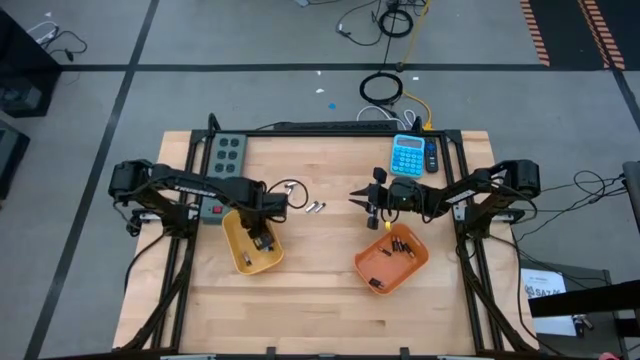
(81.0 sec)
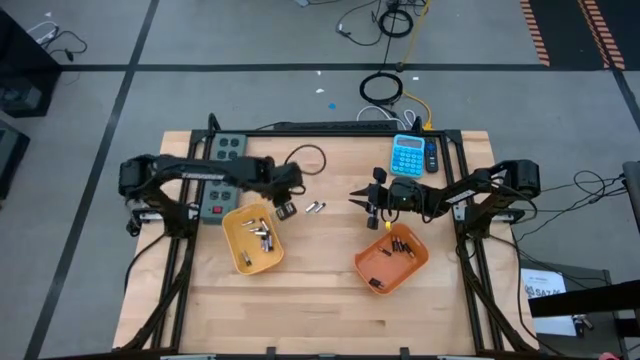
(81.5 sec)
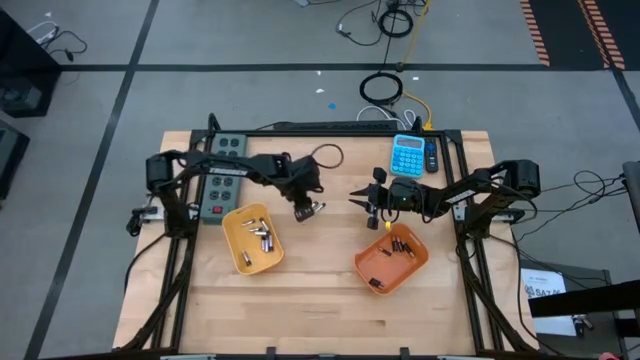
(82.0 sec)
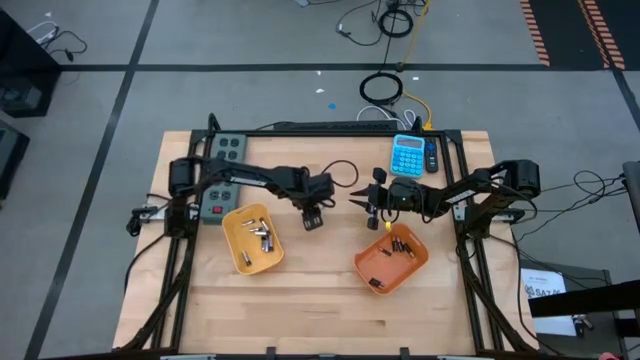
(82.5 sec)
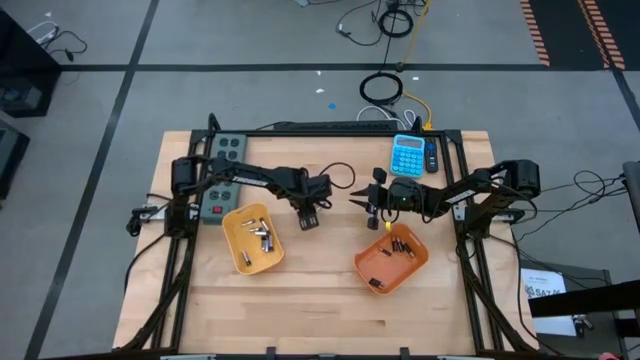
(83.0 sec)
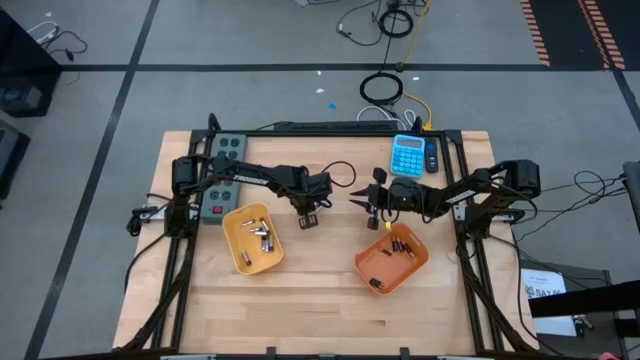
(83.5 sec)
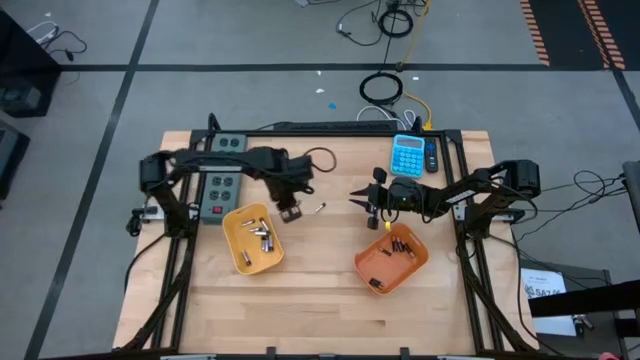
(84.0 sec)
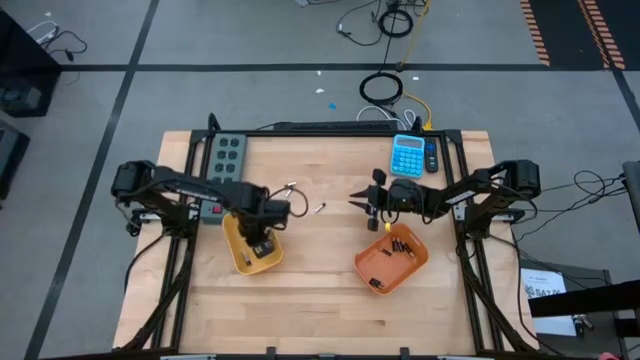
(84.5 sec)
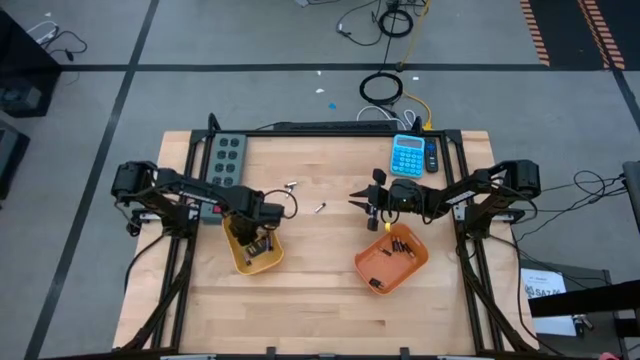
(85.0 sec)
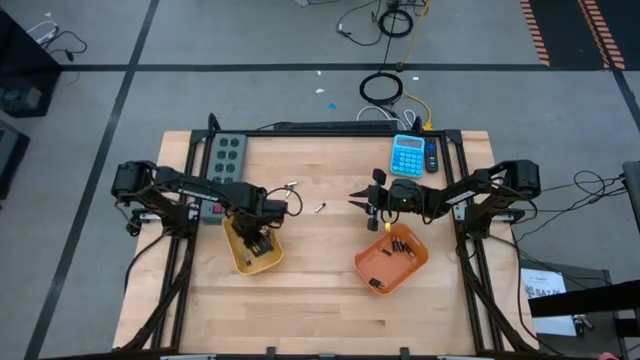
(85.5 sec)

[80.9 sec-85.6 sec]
Task: Sort batteries
Put the silver battery into the yellow bin

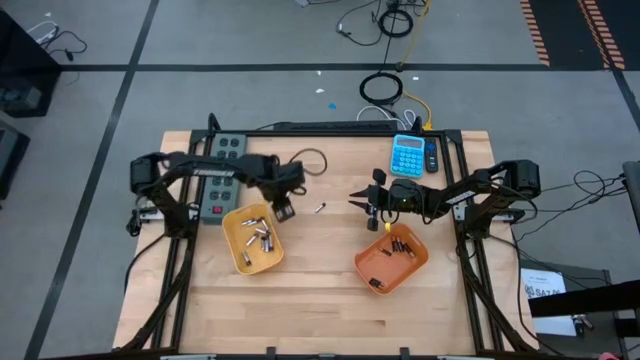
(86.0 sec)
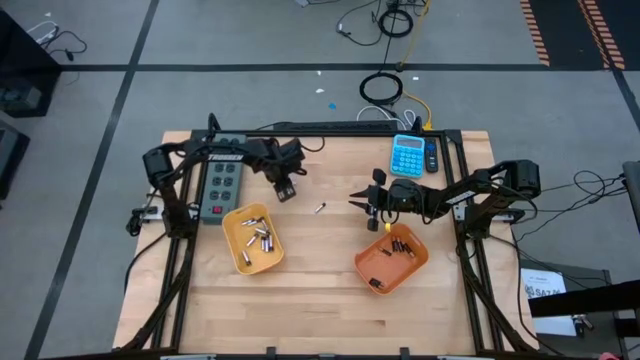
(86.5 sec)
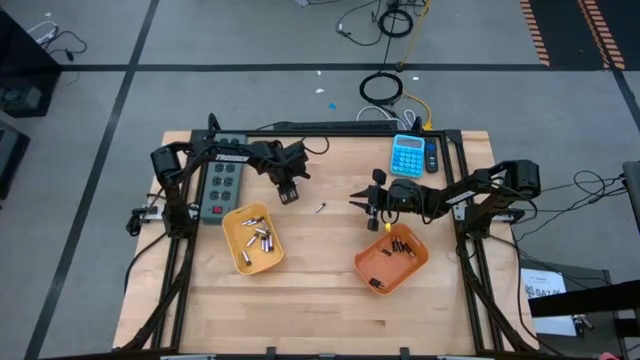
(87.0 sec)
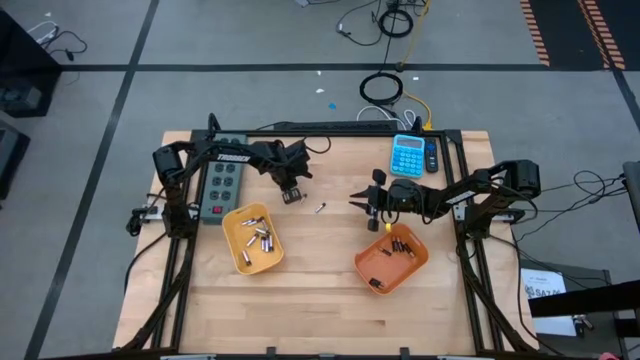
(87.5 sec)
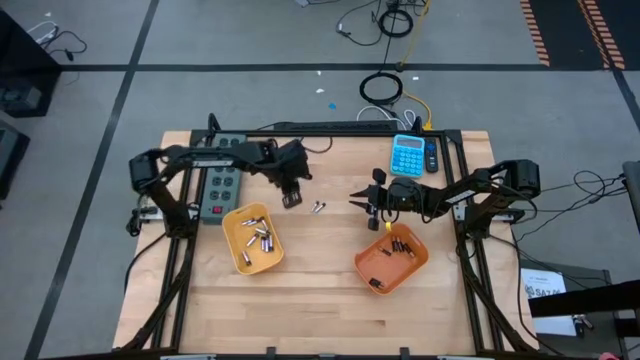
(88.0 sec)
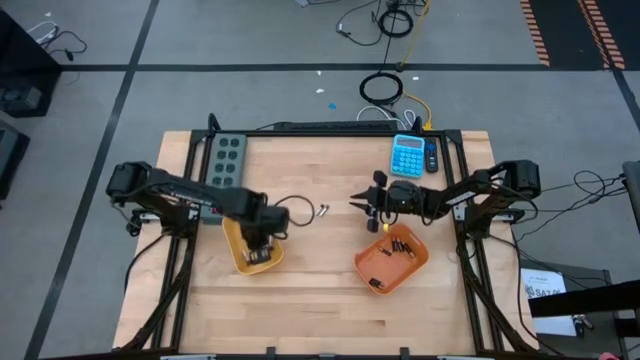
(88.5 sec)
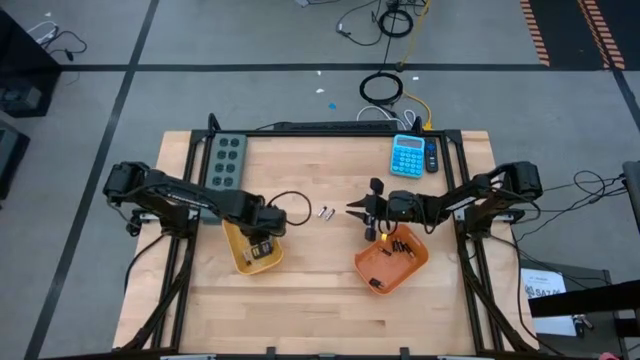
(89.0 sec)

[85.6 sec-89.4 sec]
Put the silver battery into the yellow bin

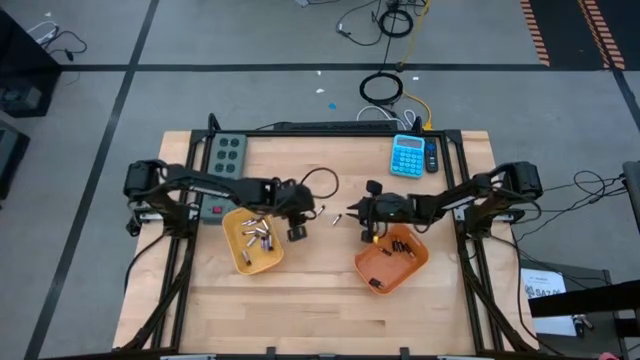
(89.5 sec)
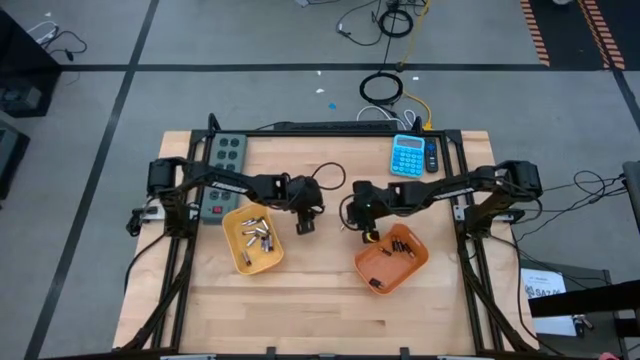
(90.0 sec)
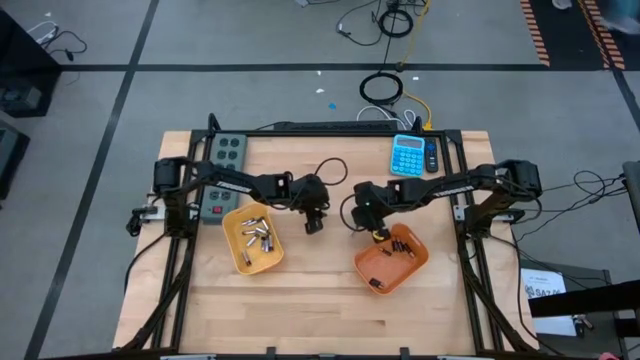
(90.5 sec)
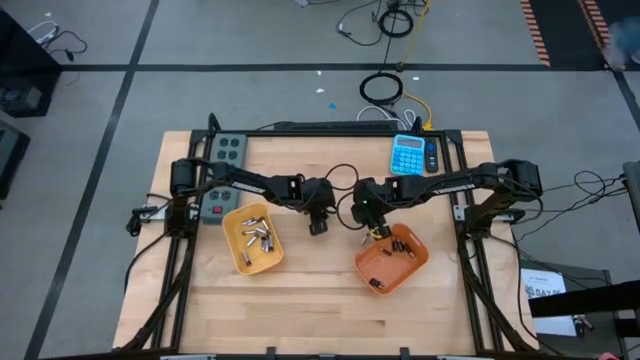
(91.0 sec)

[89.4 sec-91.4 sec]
Put the silver battery into the yellow bin

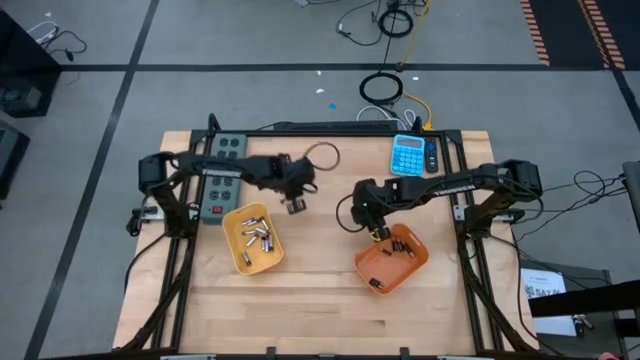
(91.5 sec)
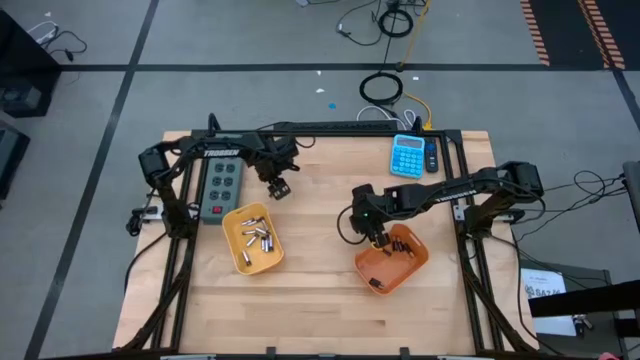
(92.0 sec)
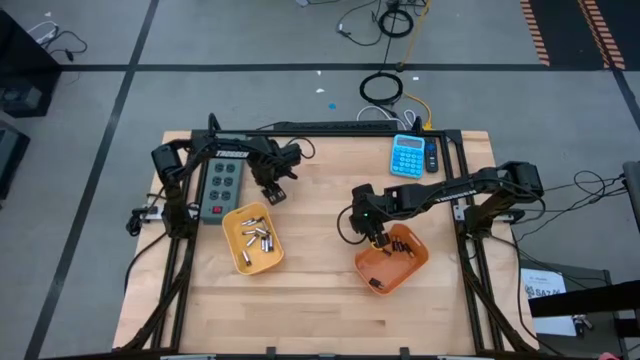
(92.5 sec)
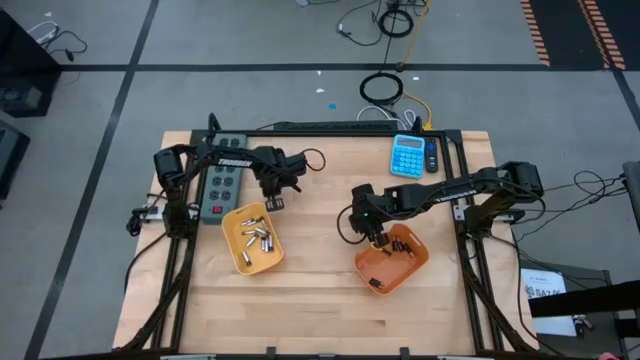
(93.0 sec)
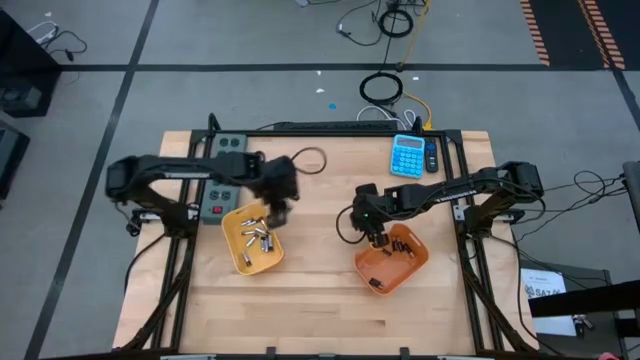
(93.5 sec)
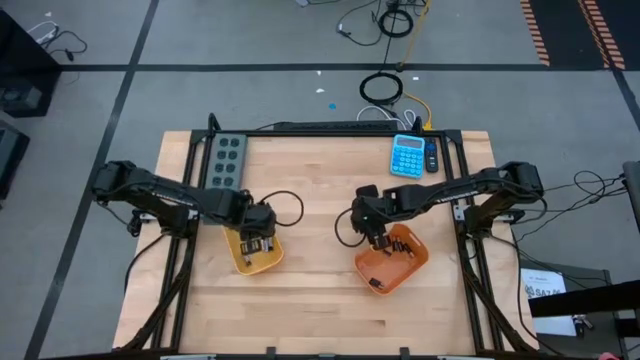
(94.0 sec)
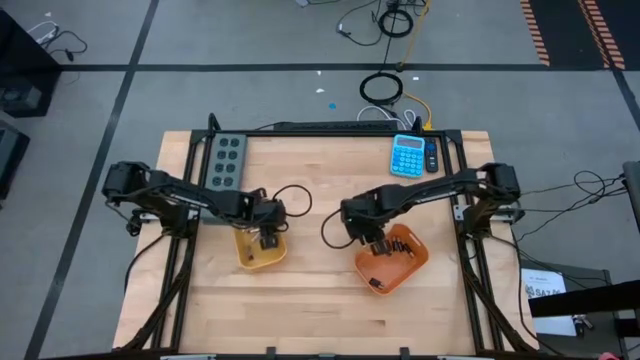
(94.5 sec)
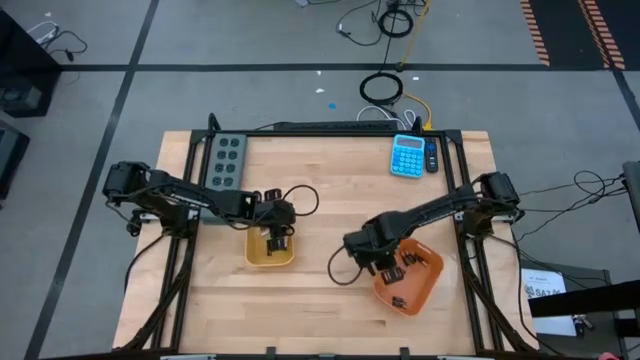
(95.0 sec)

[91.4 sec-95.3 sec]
Put the silver battery into the yellow bin

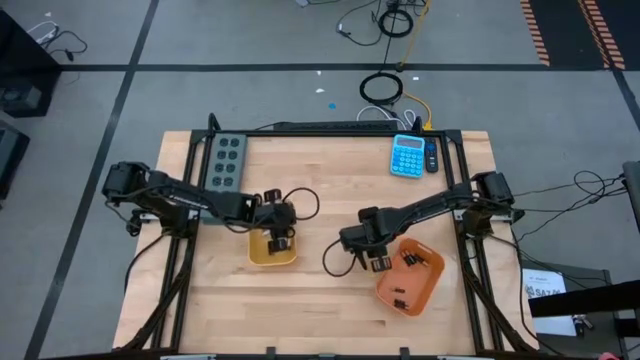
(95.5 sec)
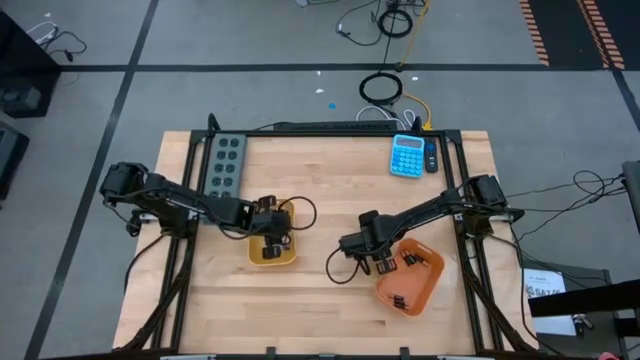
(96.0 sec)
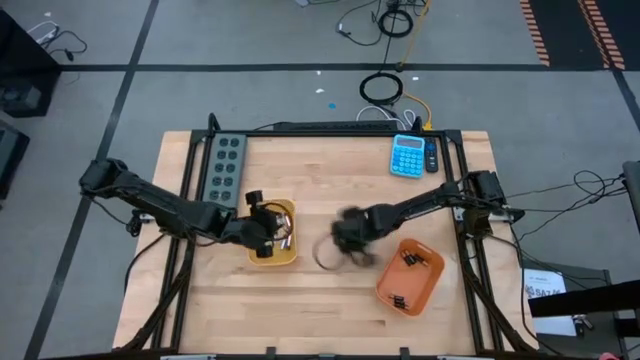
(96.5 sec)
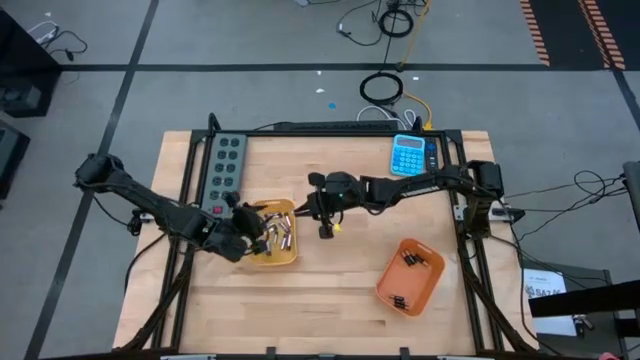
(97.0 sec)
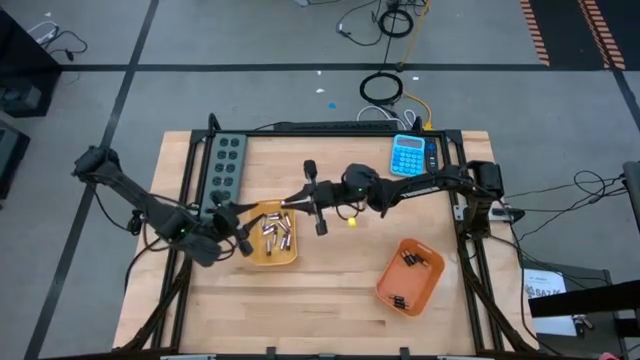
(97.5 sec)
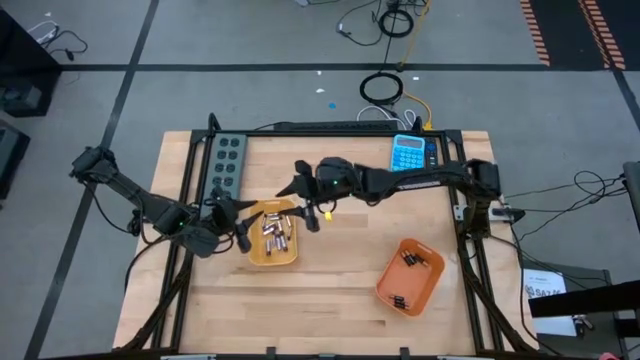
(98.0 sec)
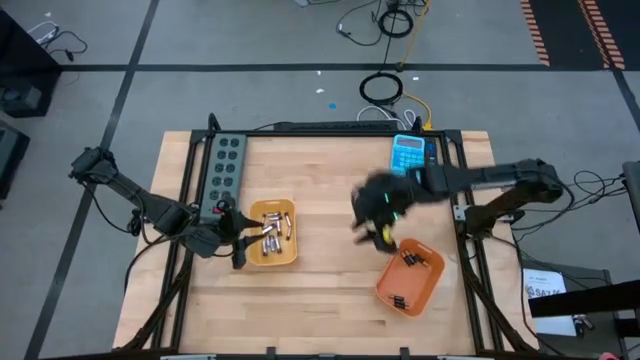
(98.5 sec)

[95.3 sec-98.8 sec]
Put the silver battery into the yellow bin

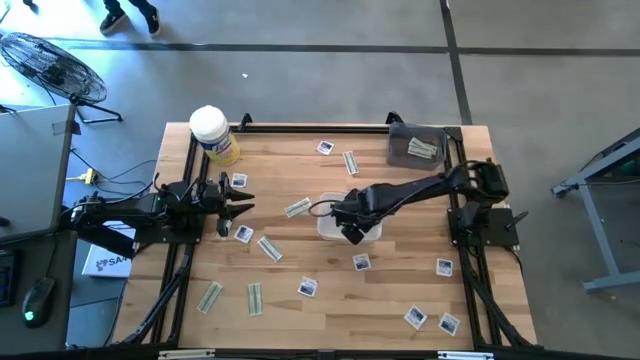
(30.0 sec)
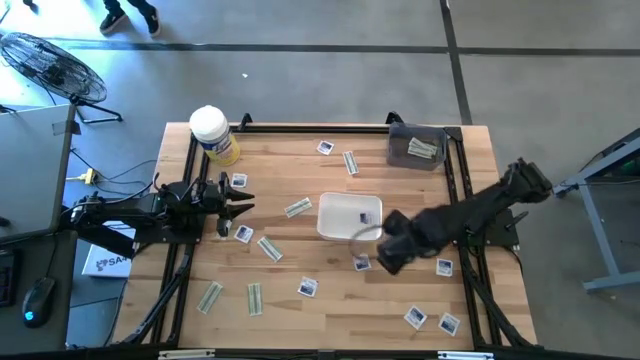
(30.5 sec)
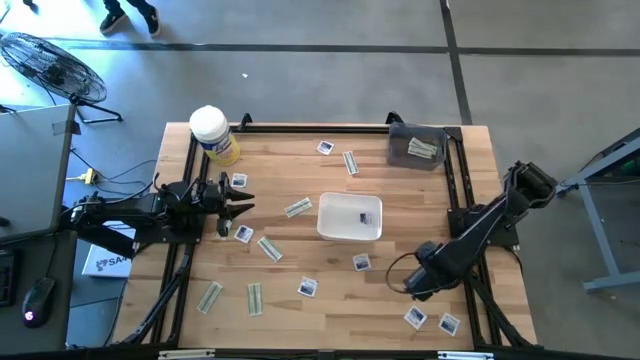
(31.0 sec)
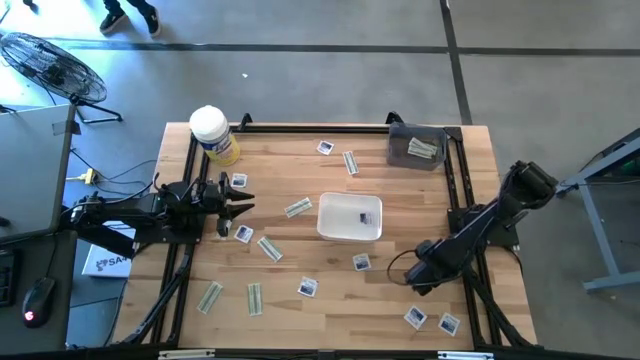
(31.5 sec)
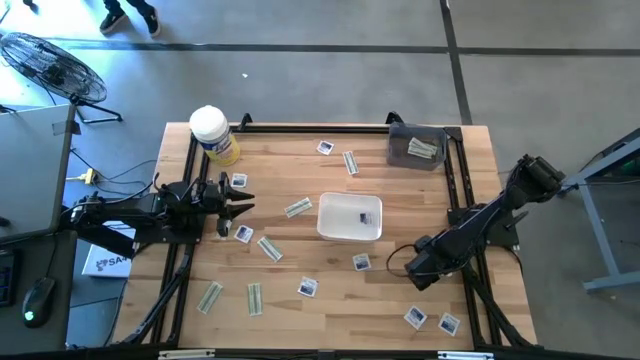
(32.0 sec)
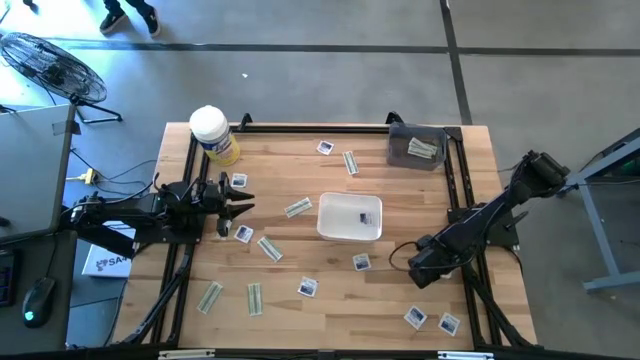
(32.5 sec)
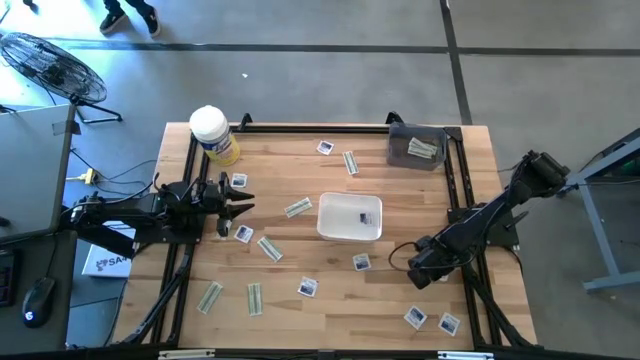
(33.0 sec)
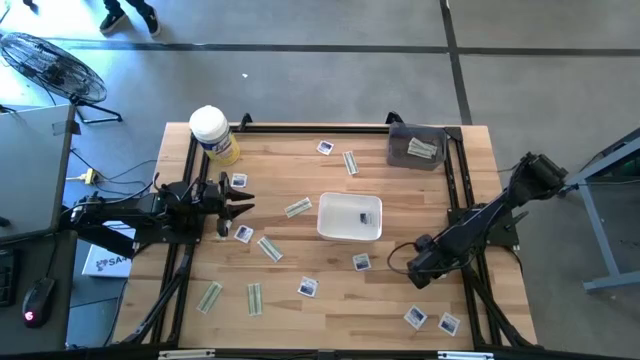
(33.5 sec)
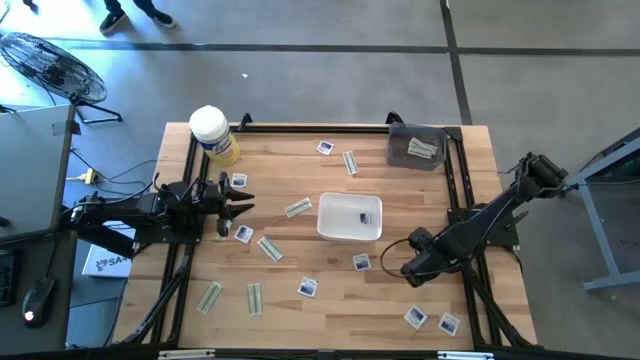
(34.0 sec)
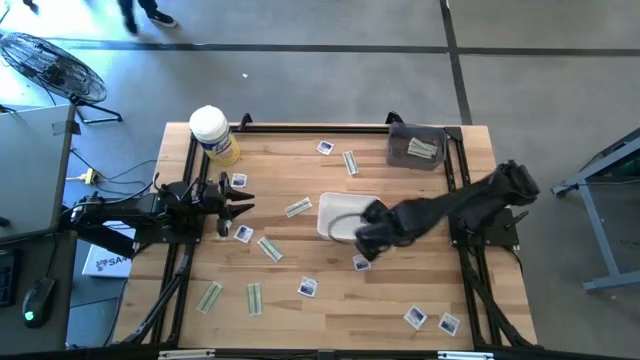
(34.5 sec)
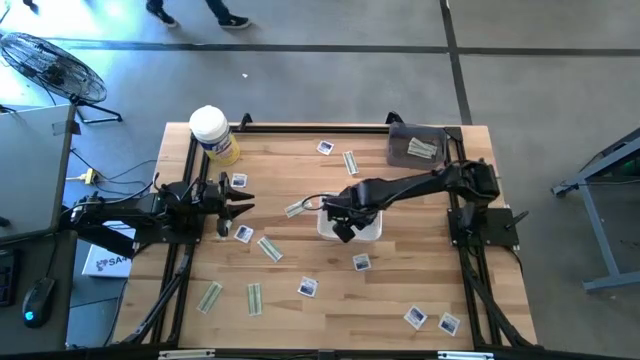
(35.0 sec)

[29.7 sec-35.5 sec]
Task: Pick & Place First Aid Supplies
Put the blue alcohol pad into the white bin
